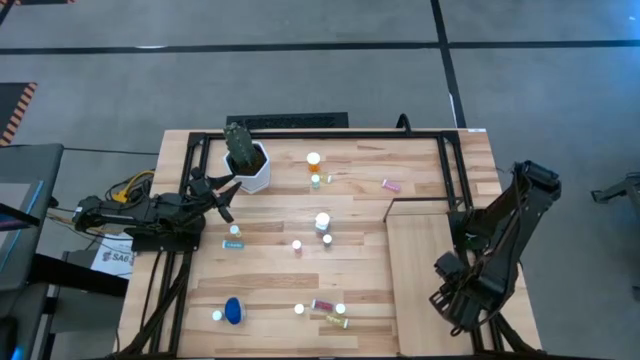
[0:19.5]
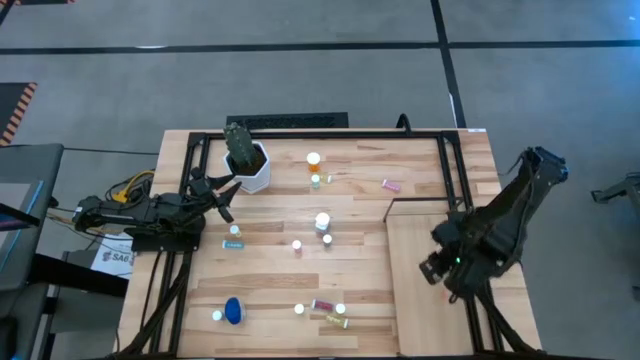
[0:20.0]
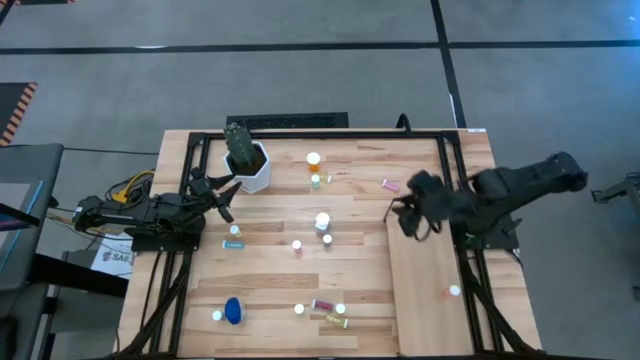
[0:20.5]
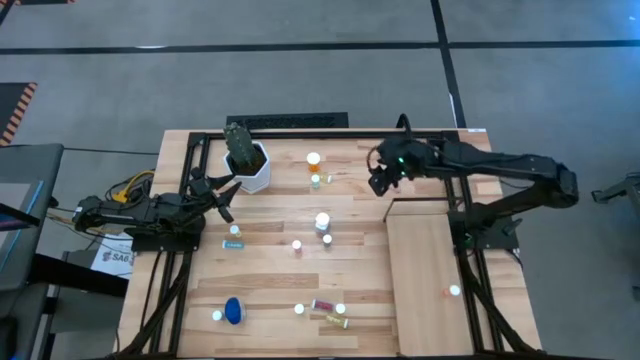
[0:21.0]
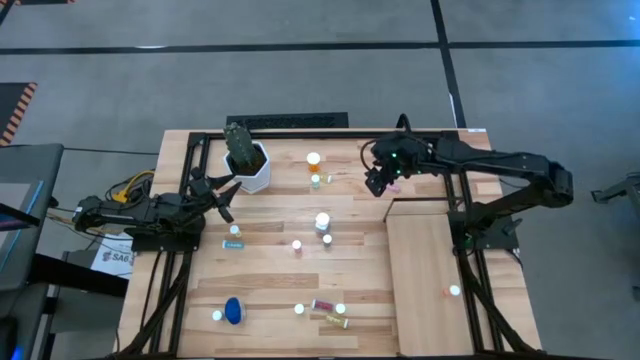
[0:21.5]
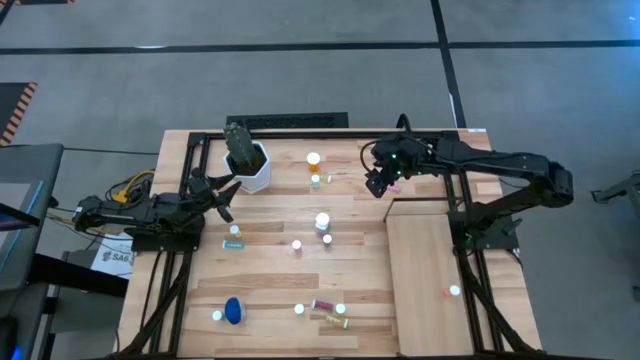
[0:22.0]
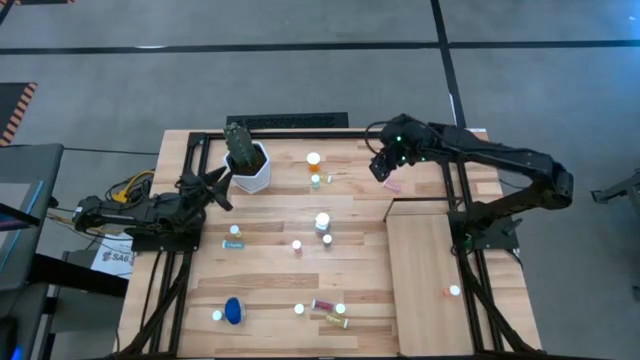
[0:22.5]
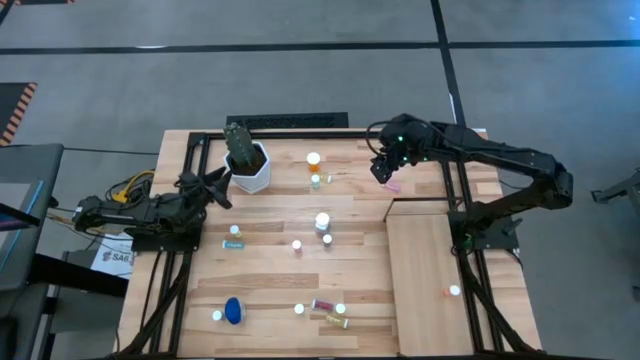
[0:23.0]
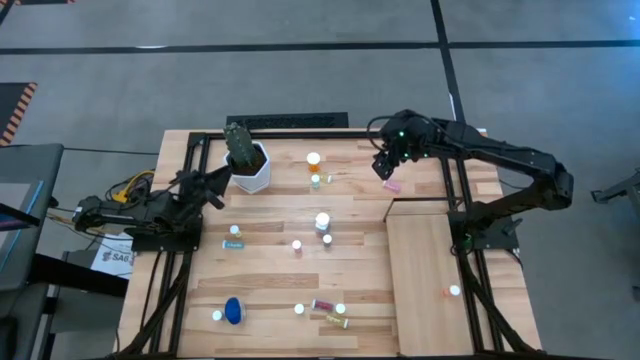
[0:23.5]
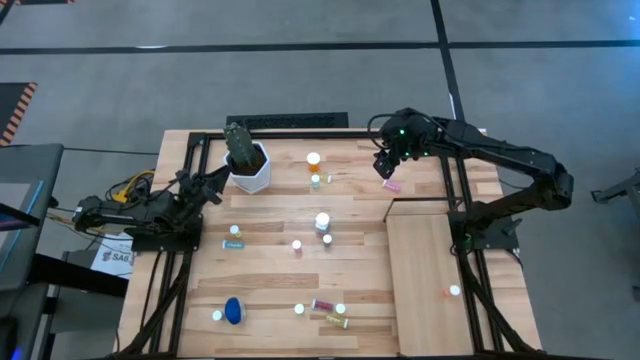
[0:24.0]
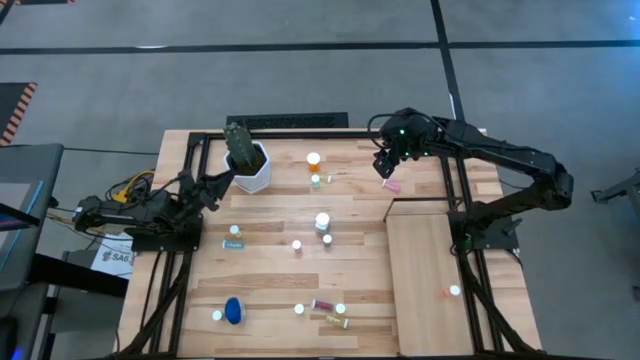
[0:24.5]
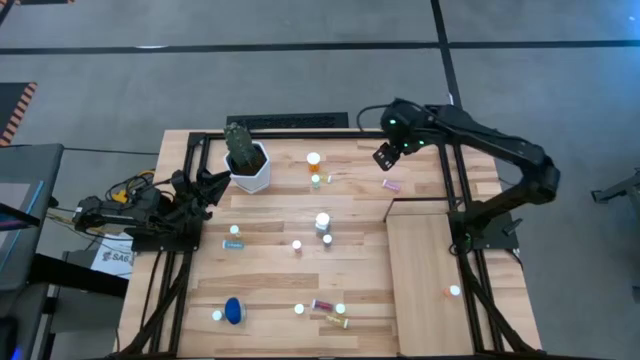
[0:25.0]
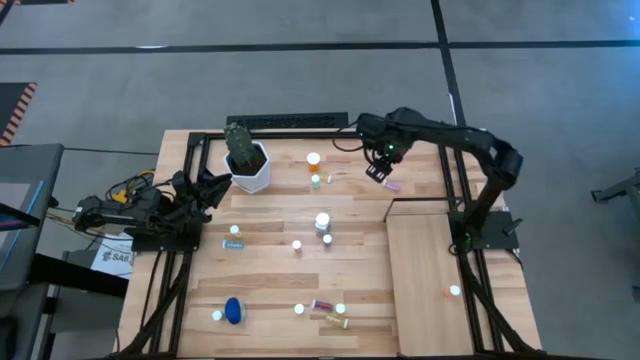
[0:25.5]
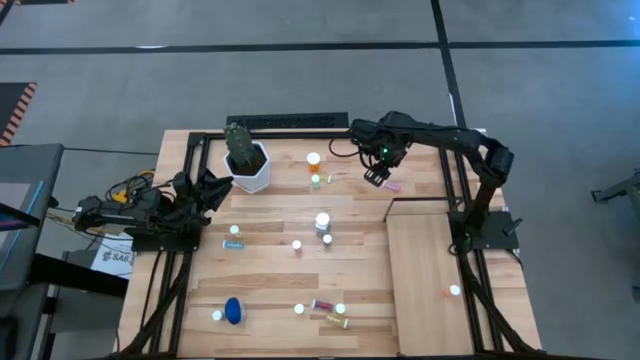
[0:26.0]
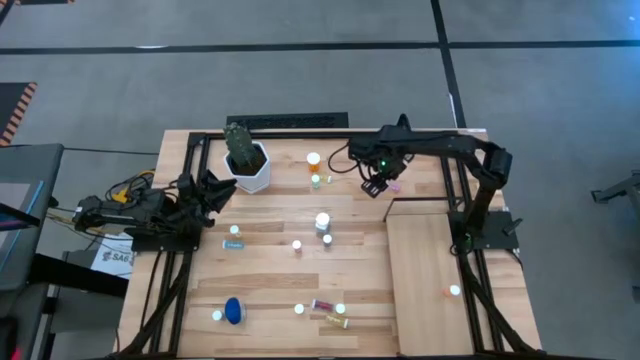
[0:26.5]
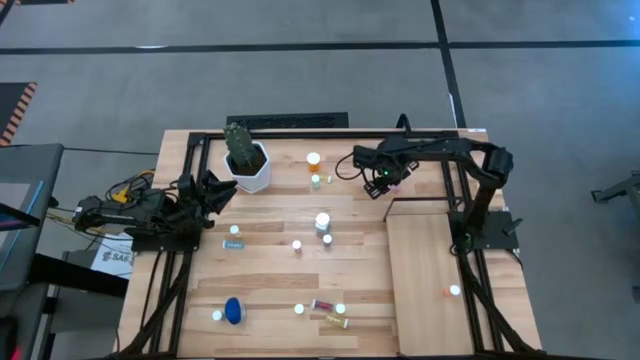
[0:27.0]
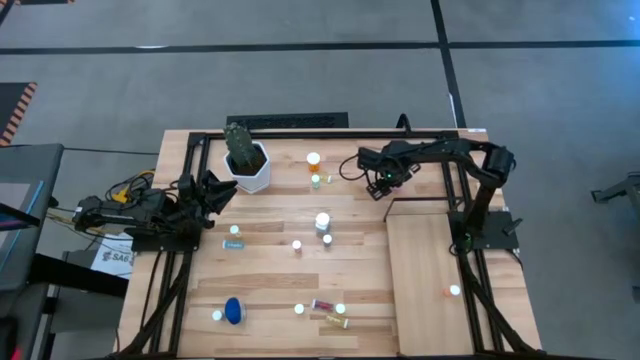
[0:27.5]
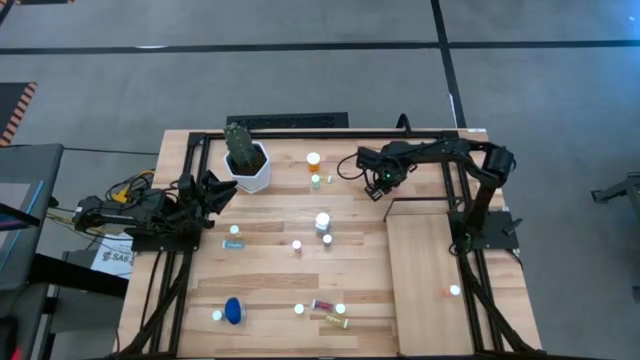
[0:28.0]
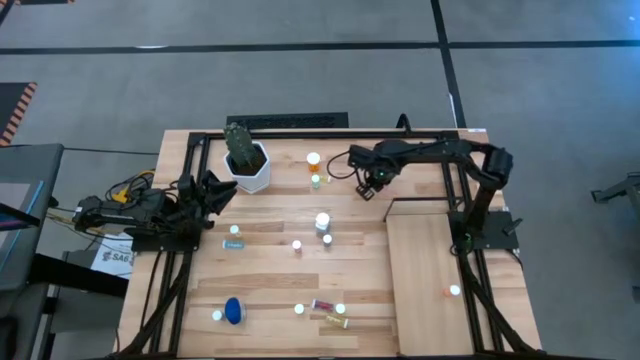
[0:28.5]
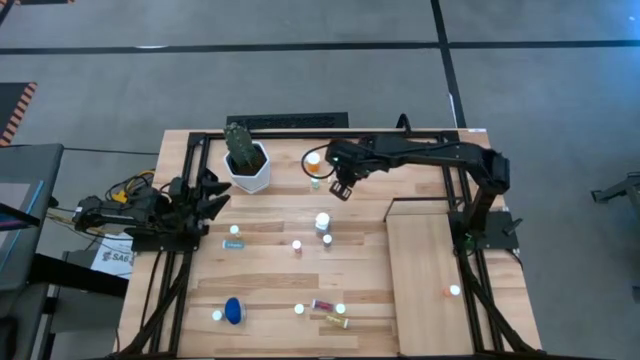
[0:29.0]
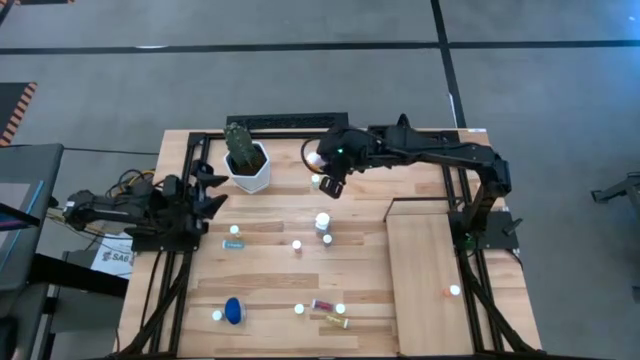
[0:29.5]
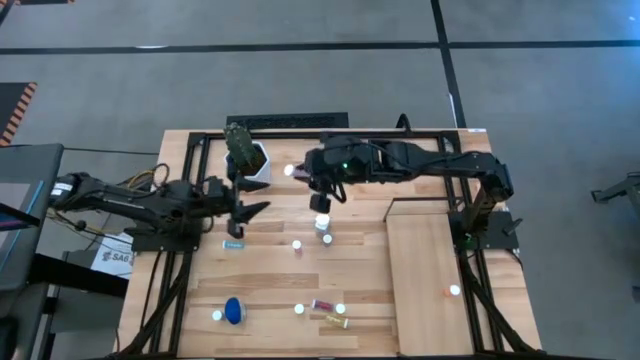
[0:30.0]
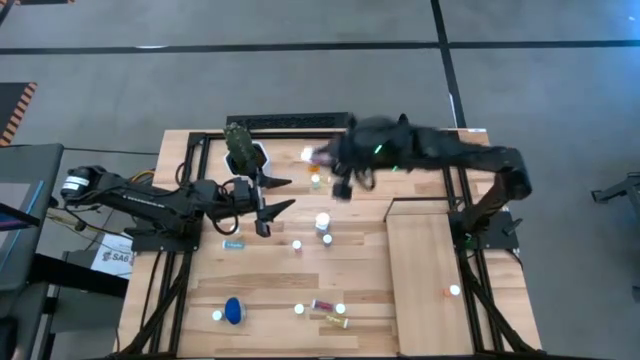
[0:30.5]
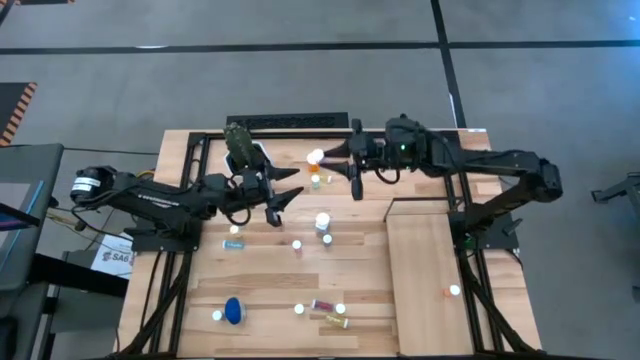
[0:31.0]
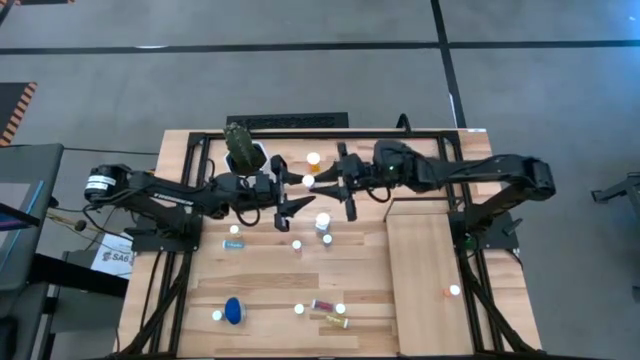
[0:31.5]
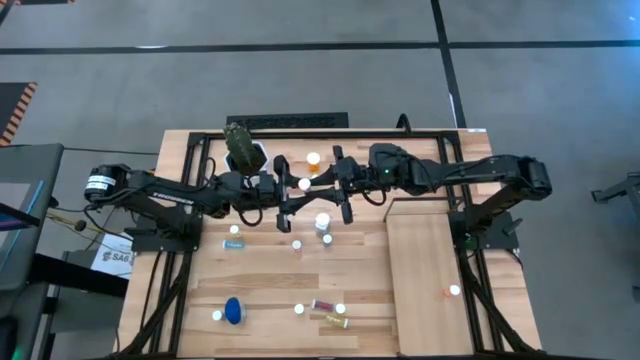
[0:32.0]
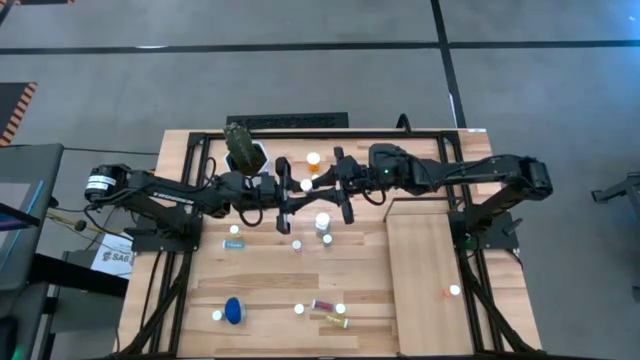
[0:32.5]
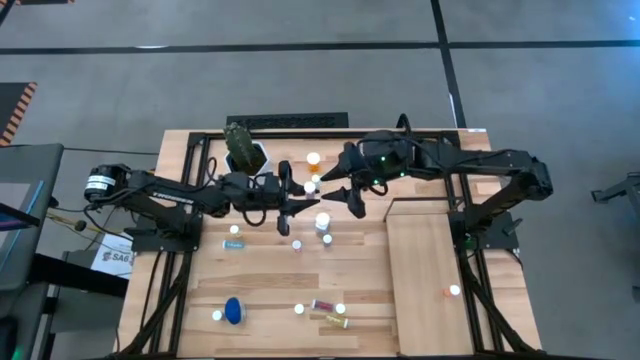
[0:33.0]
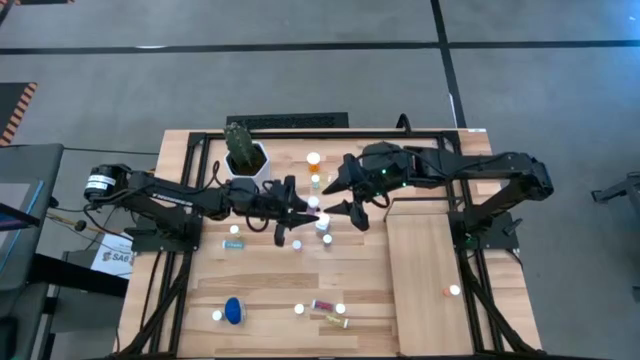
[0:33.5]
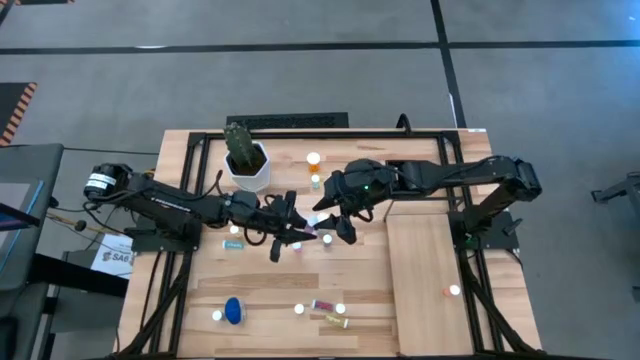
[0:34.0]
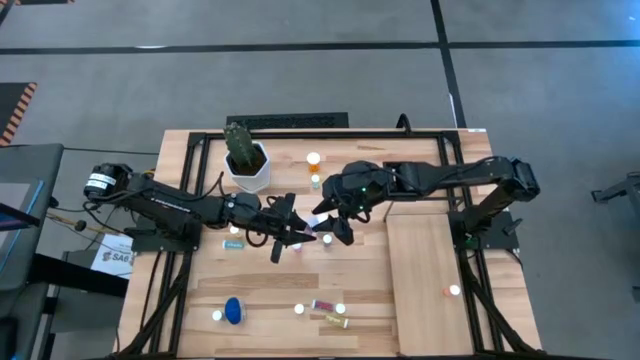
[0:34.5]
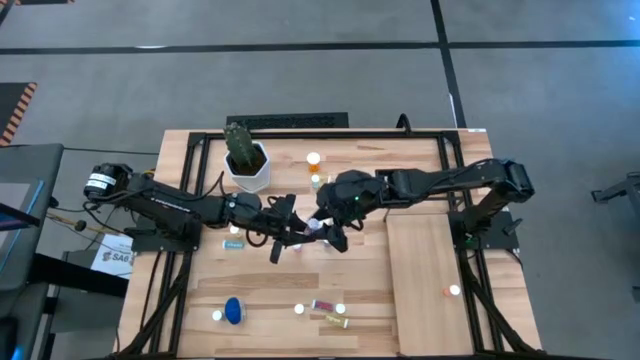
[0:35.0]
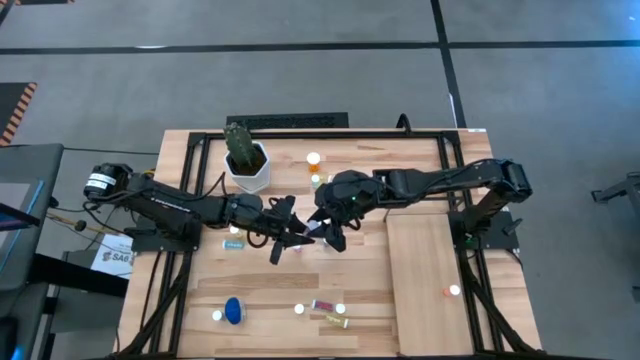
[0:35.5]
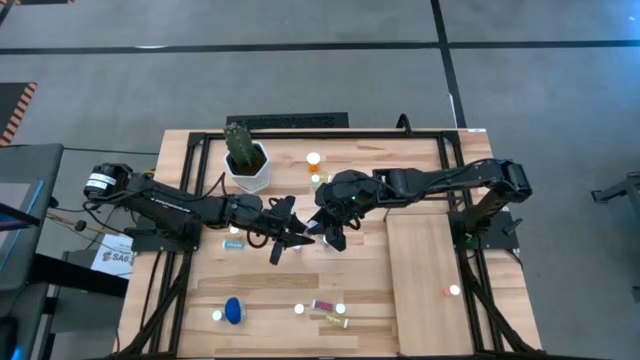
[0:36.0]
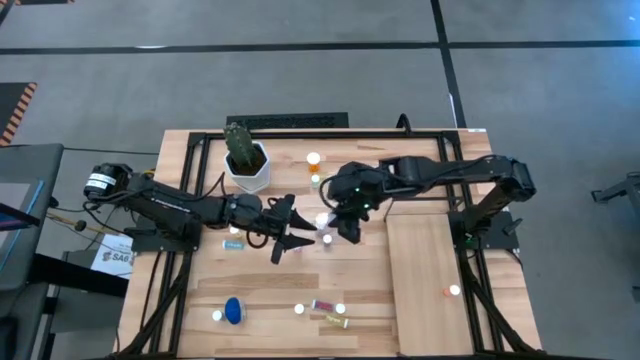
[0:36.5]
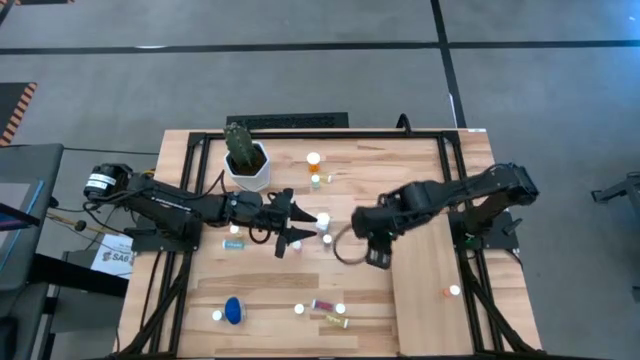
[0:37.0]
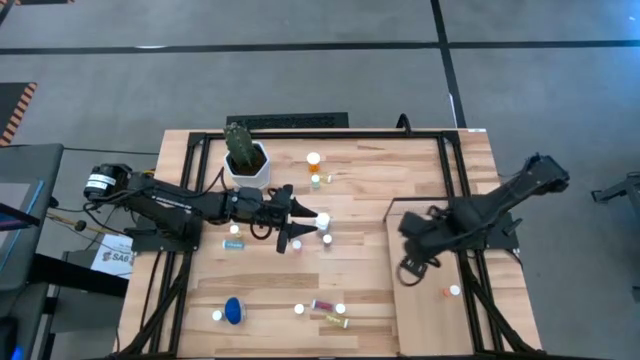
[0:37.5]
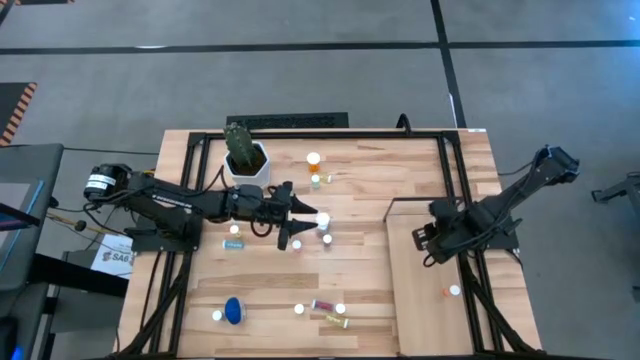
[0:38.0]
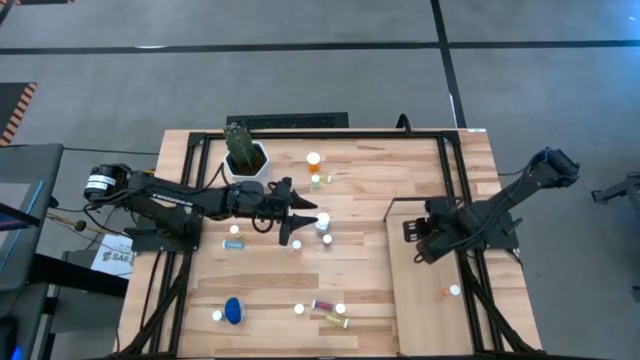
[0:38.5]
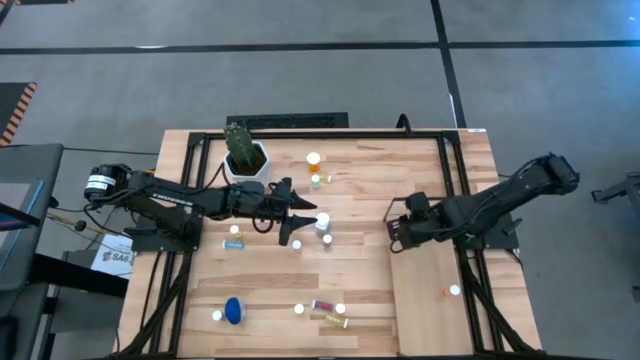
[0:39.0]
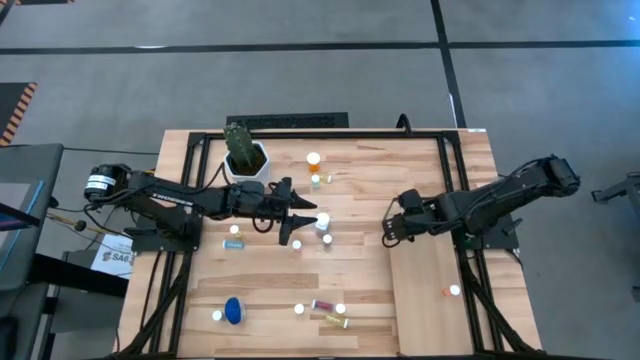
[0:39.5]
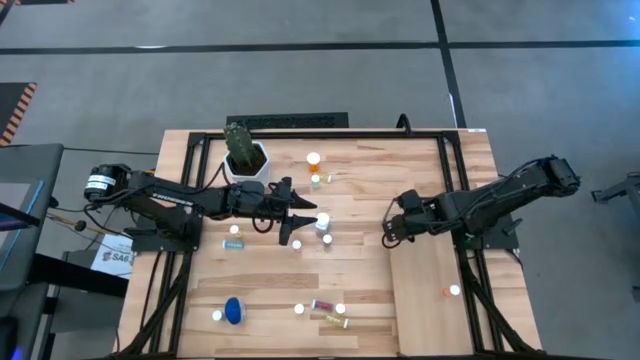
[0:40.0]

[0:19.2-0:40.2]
Task: Pick and place medicine bottles onto shelf by color
Put the top pink pill bottle on the shelf
